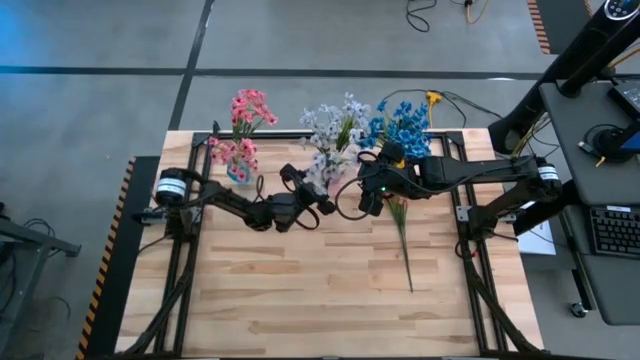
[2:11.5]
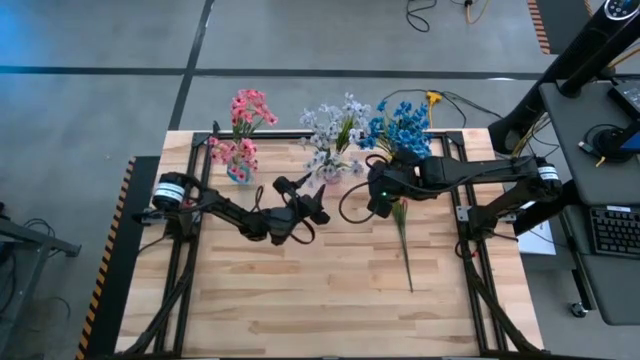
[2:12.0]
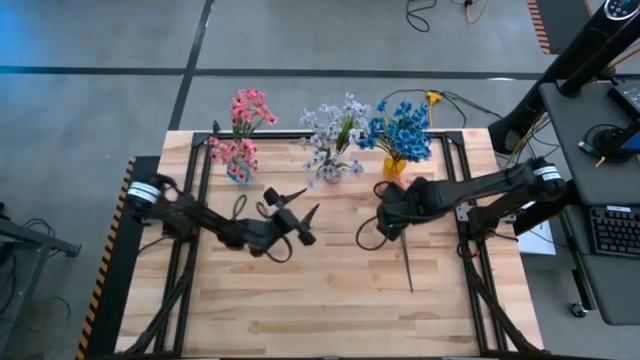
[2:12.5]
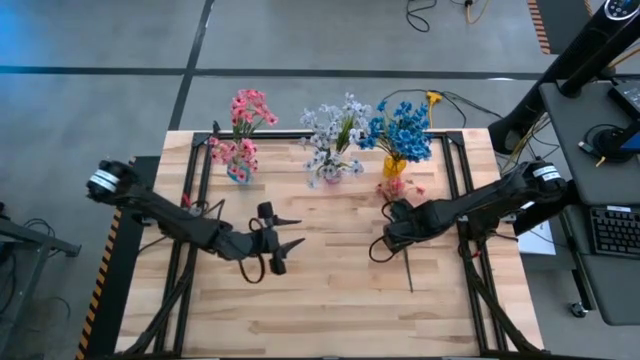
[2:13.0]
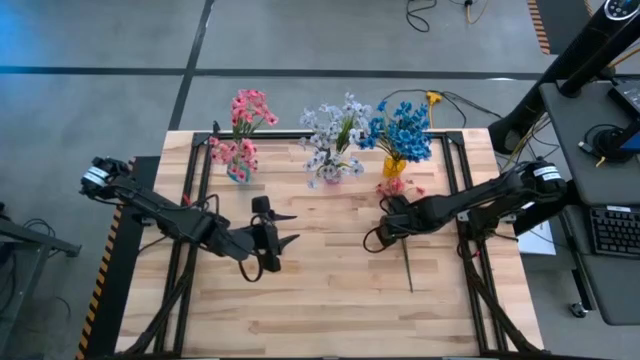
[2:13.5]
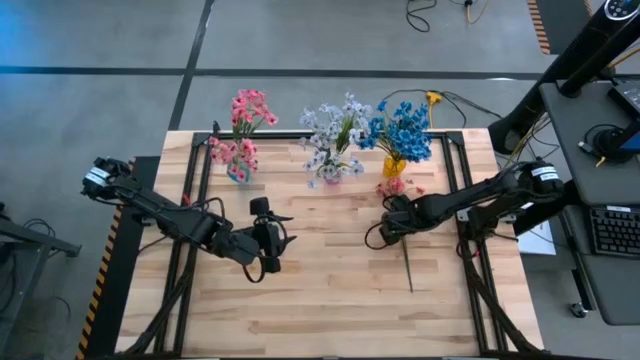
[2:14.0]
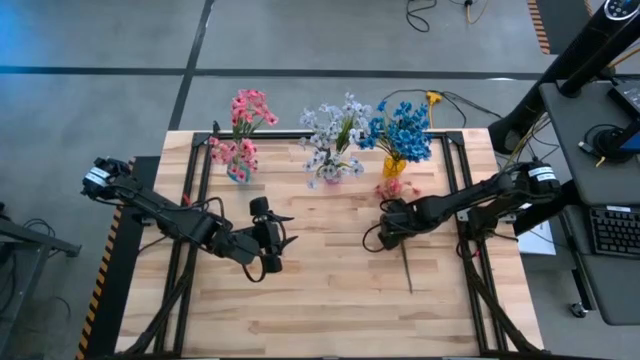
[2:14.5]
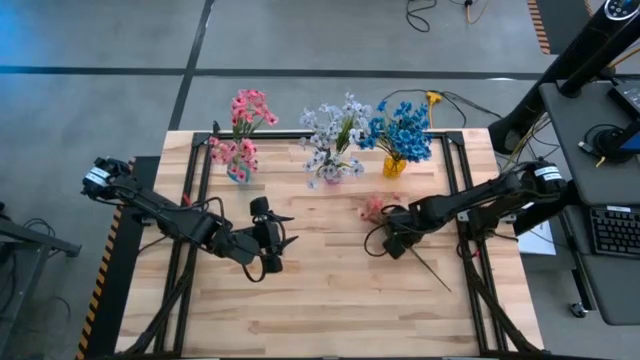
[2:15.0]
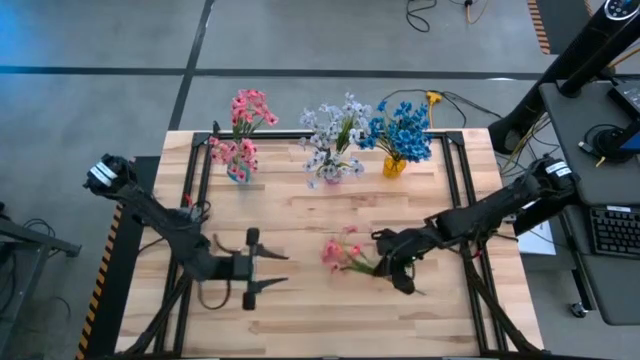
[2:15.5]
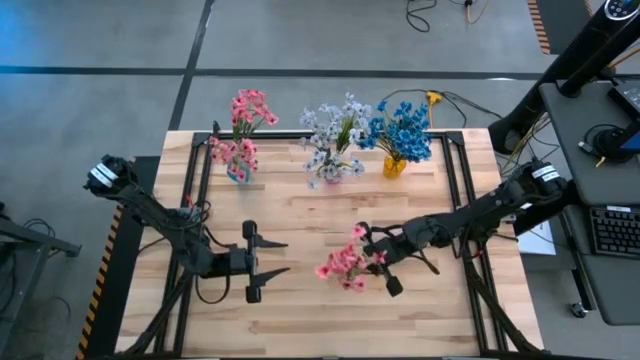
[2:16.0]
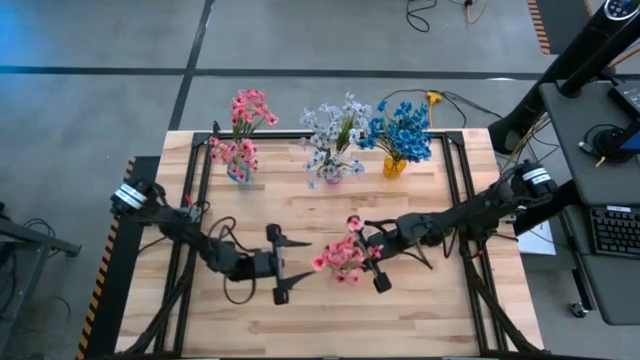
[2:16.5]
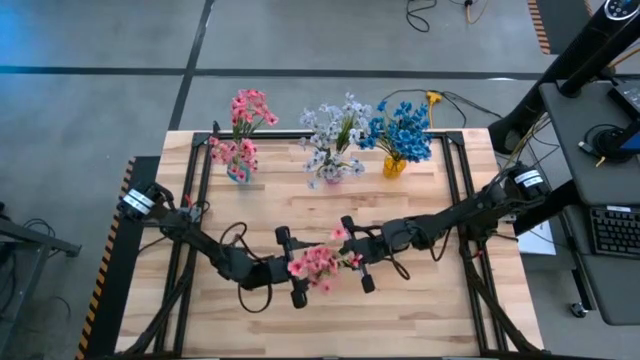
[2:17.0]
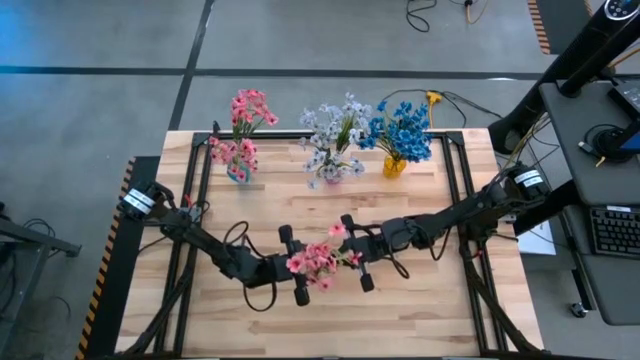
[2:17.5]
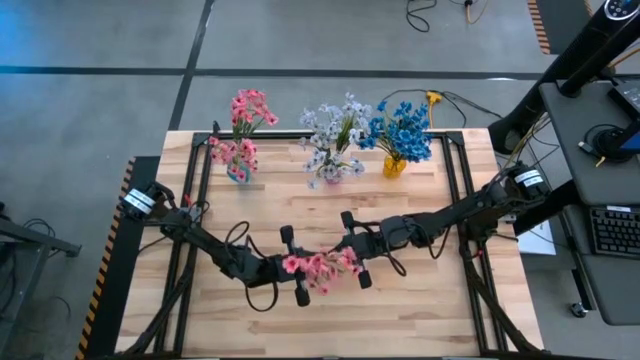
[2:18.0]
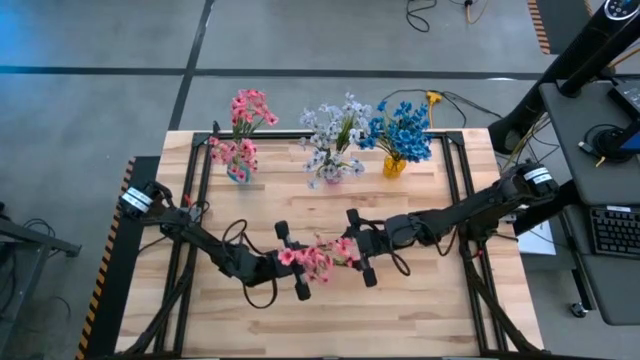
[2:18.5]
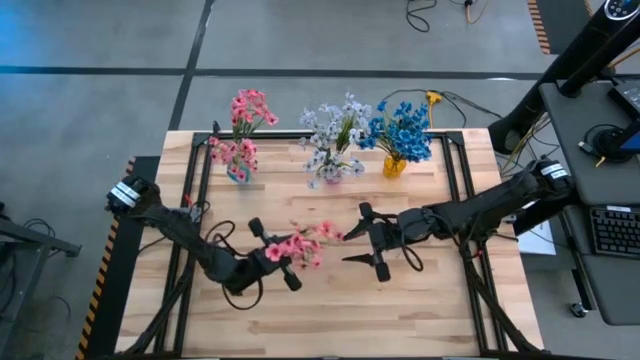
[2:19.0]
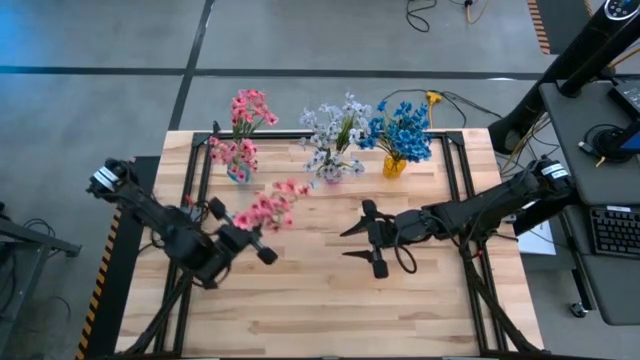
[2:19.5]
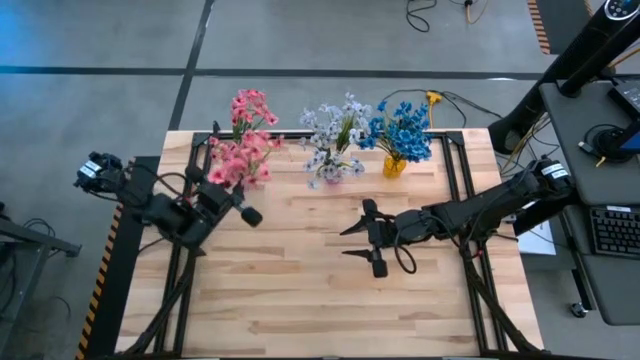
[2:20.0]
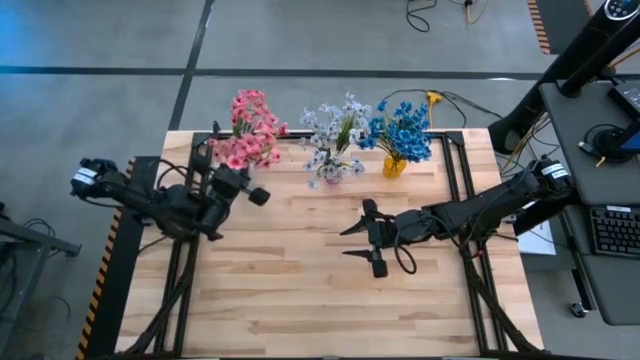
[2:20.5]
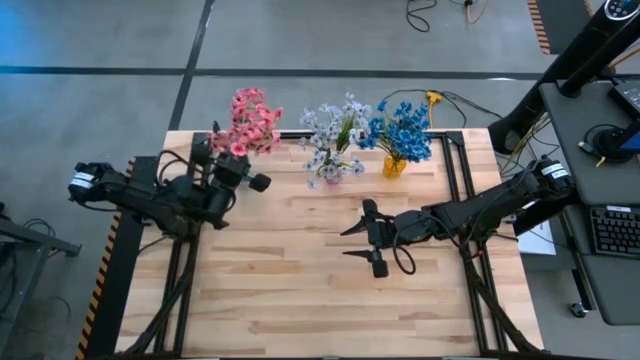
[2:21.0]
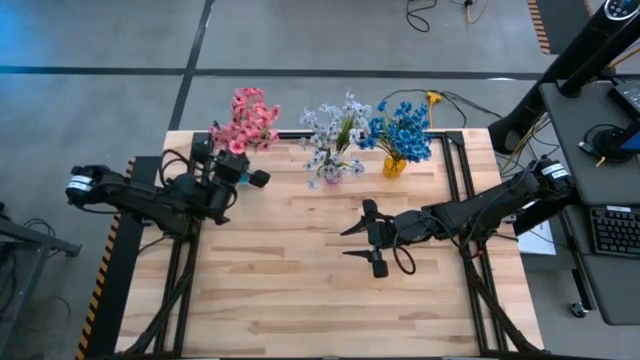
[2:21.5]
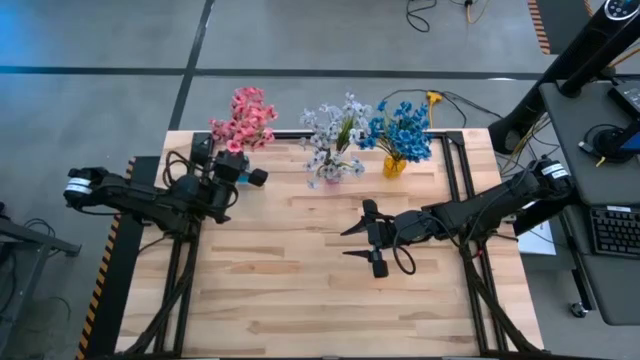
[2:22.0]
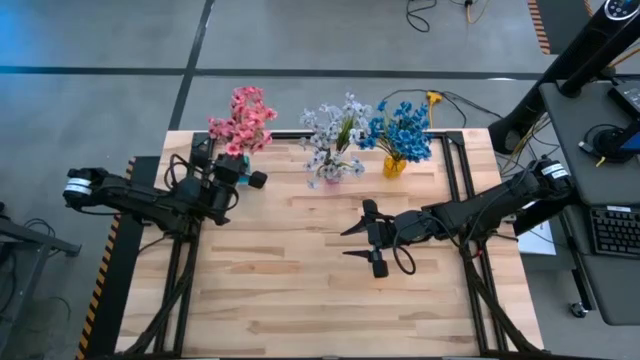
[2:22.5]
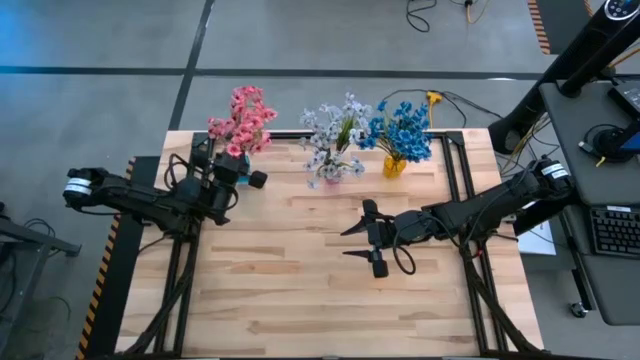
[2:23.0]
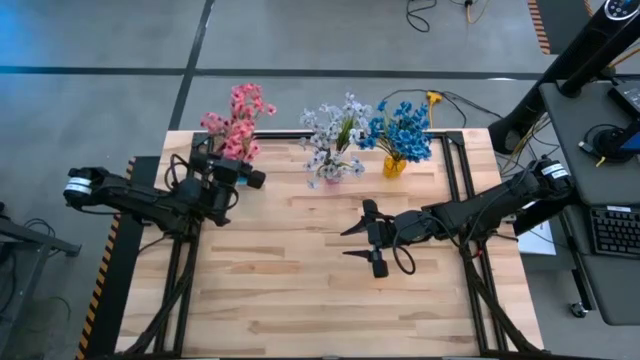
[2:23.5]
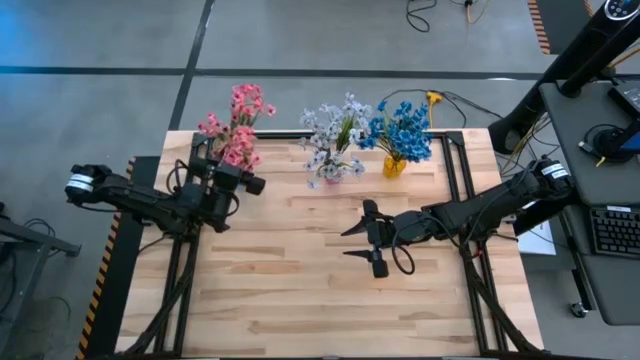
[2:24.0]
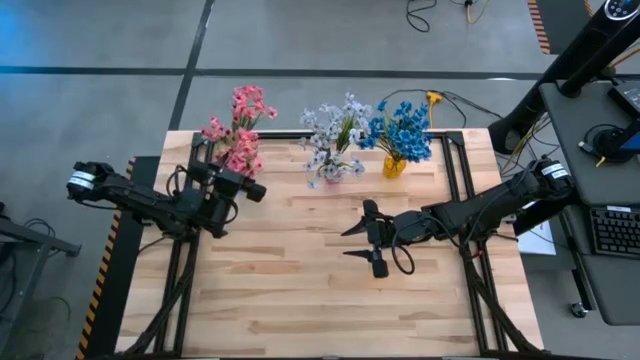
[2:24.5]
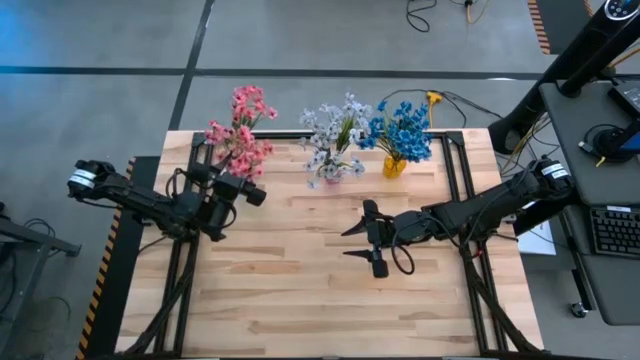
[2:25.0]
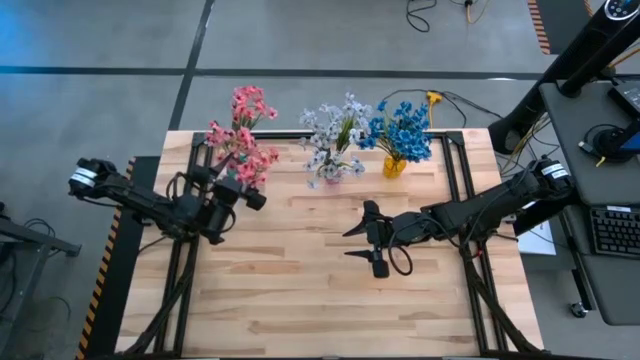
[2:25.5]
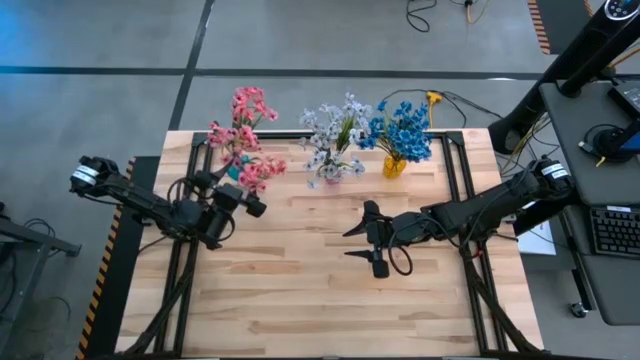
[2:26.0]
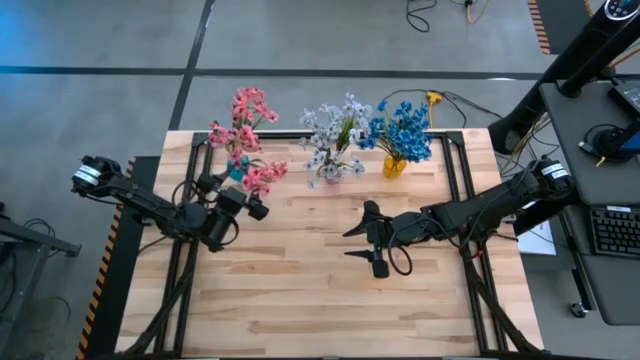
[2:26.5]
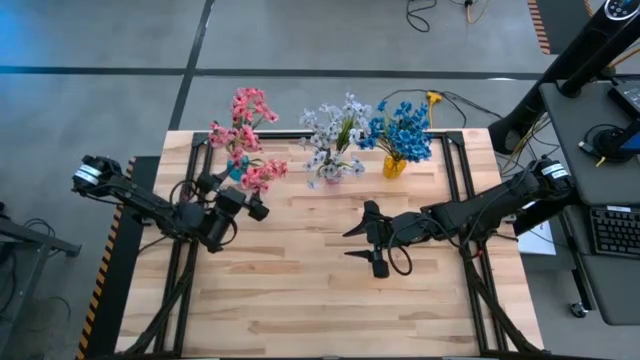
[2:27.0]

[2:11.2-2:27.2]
Task: Sort flowers into vase by color
Put the pink flowers into the blue vase

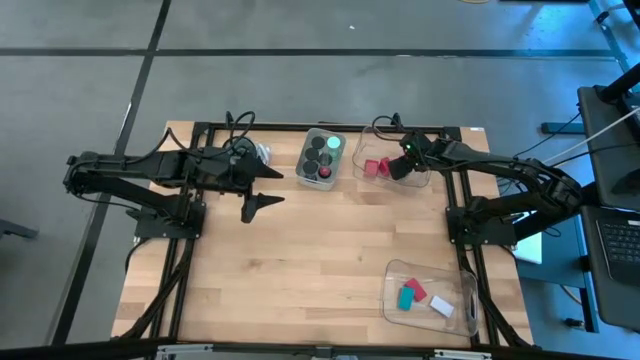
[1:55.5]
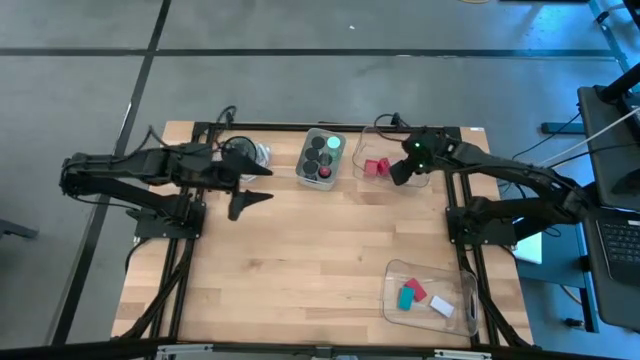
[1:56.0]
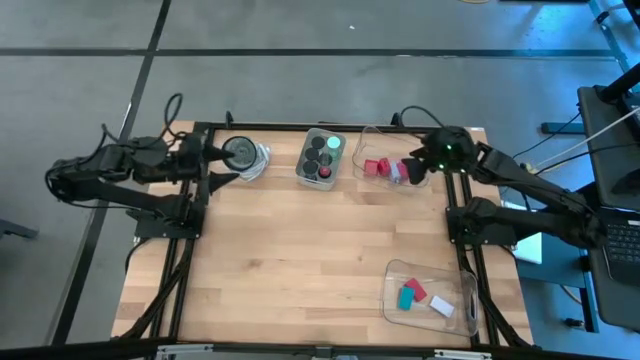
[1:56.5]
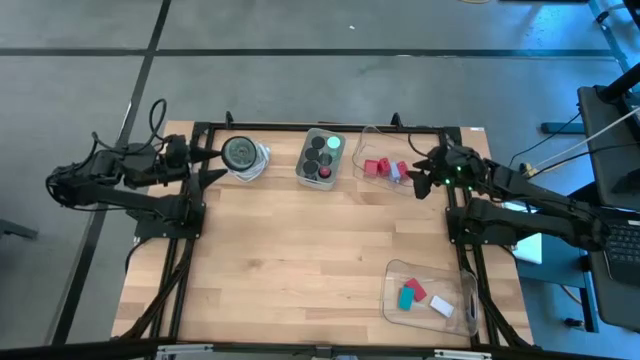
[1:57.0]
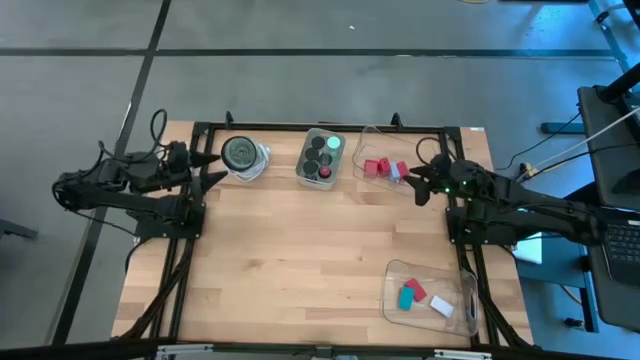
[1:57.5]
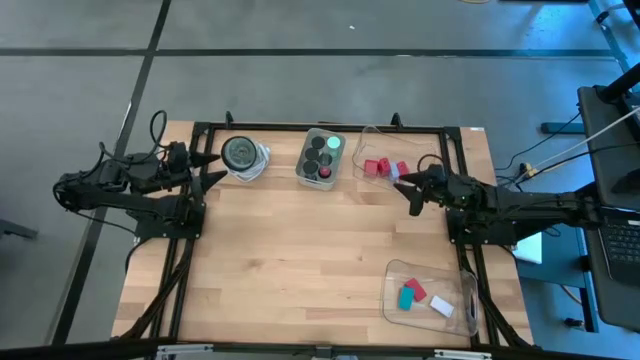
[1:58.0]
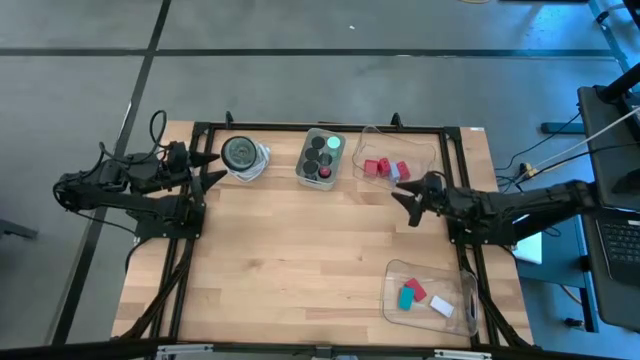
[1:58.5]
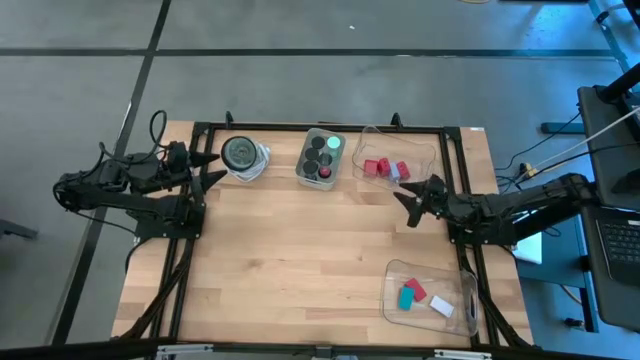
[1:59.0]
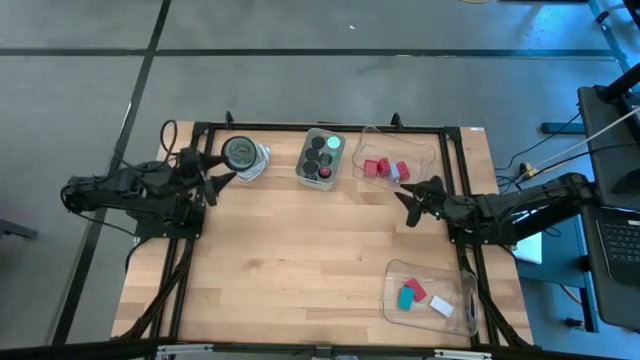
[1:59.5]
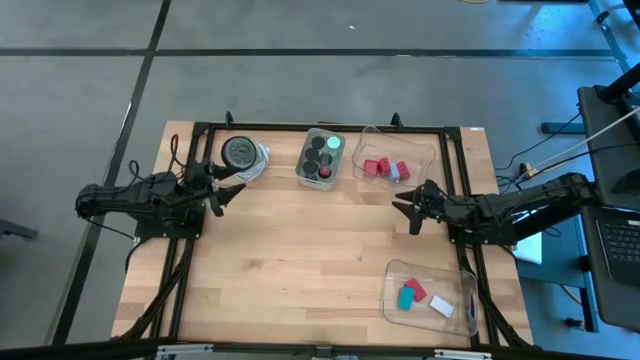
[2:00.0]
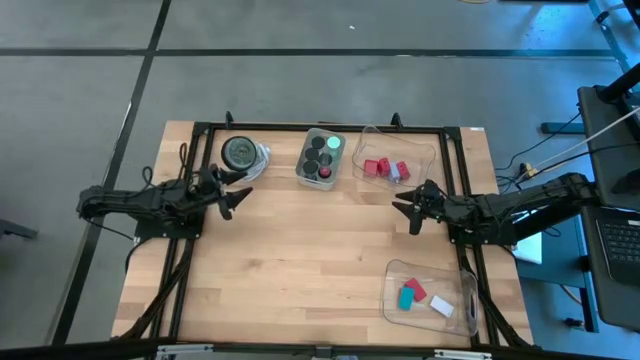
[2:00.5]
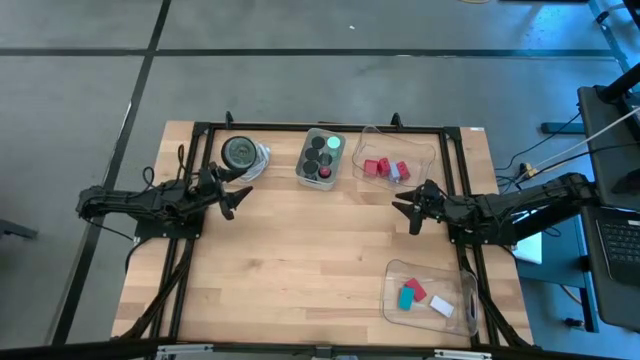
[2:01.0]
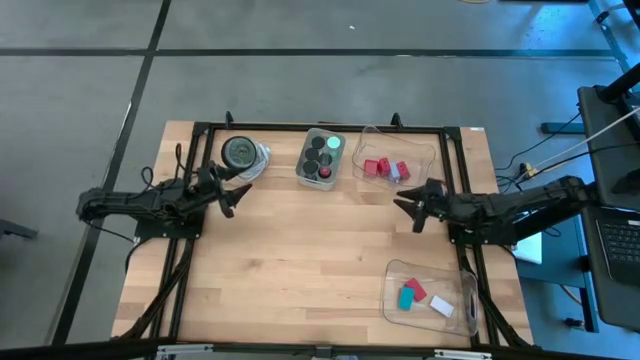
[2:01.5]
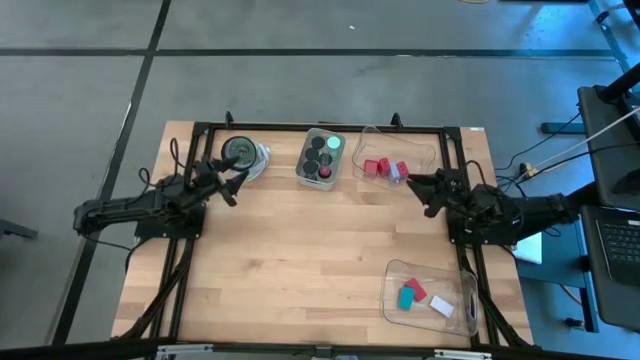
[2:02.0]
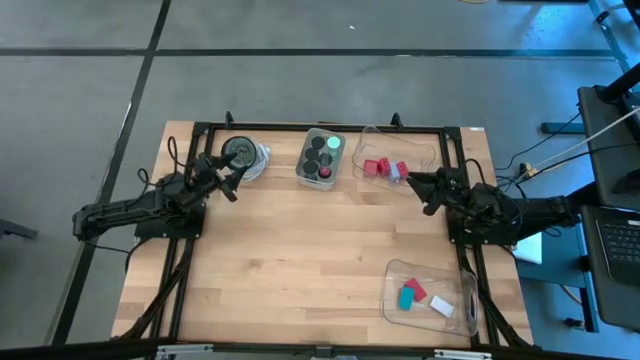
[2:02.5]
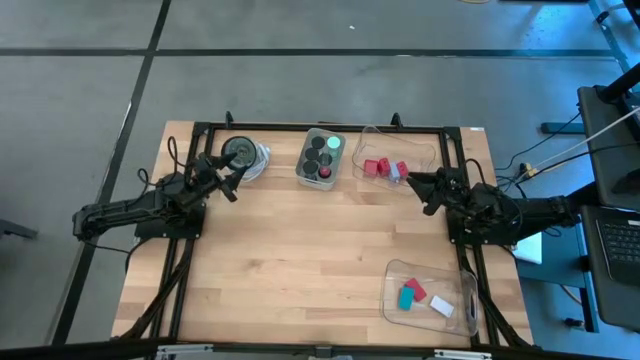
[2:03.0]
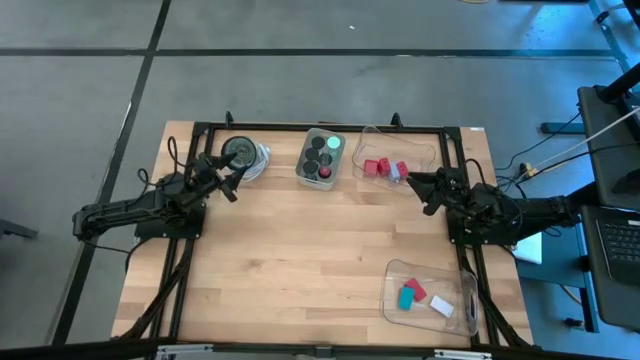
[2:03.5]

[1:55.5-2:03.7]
Task: Pick & Place Office items
Return to Home Position
